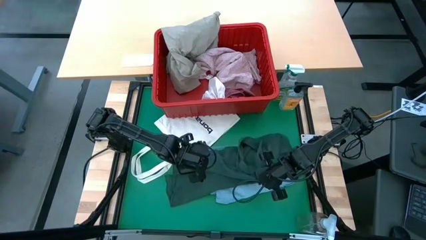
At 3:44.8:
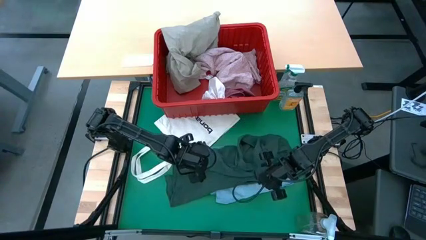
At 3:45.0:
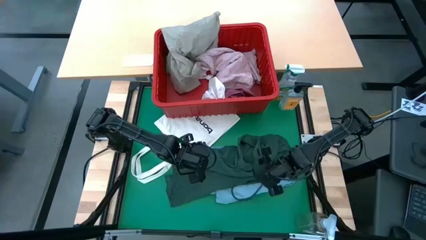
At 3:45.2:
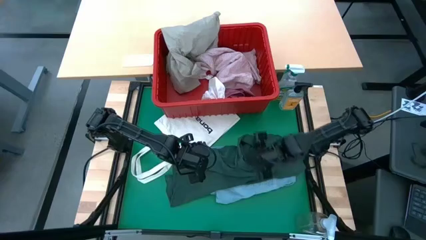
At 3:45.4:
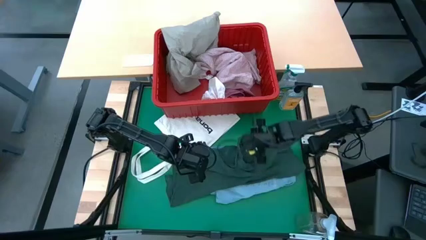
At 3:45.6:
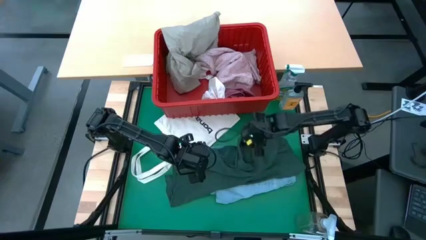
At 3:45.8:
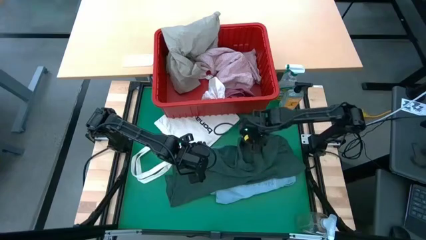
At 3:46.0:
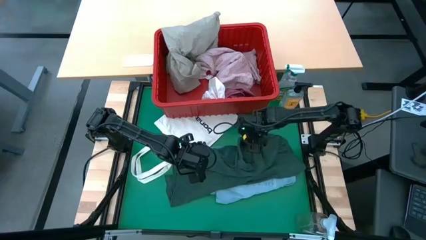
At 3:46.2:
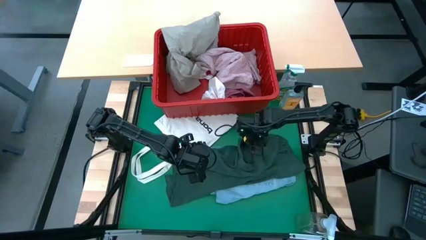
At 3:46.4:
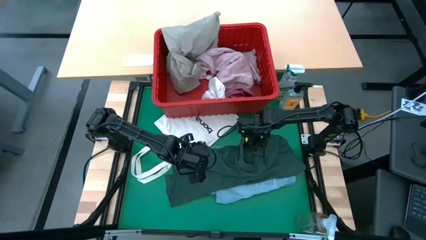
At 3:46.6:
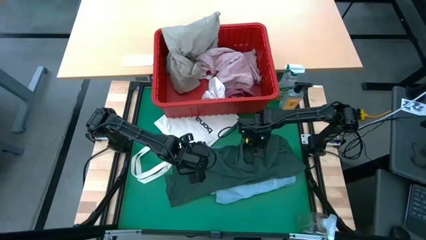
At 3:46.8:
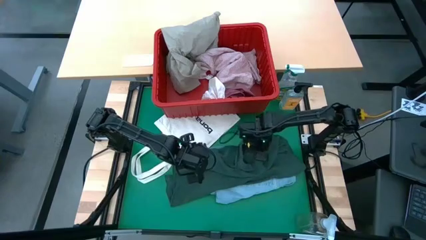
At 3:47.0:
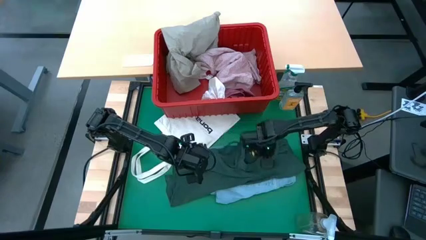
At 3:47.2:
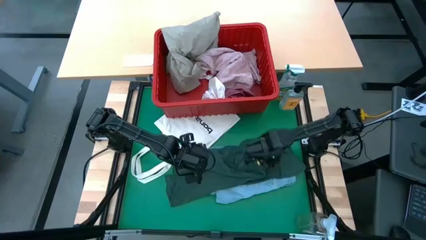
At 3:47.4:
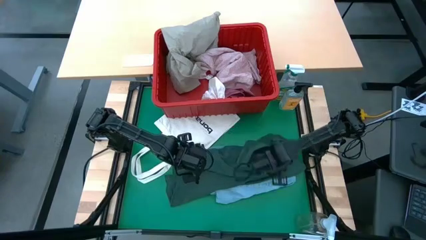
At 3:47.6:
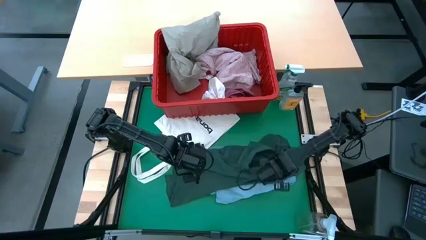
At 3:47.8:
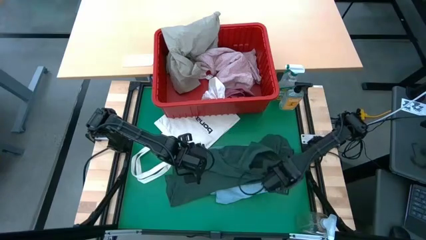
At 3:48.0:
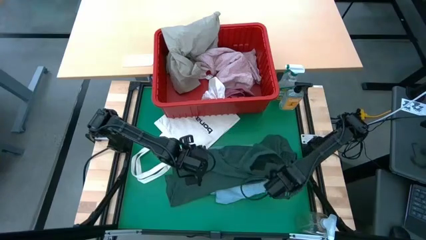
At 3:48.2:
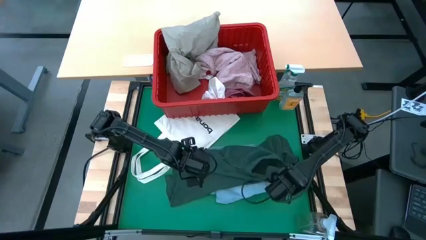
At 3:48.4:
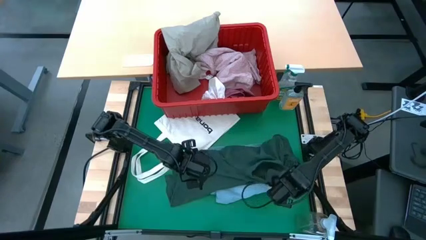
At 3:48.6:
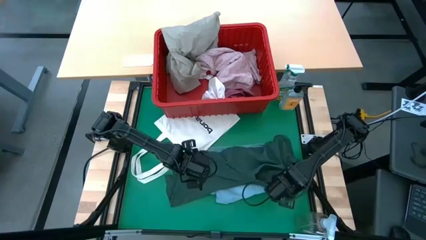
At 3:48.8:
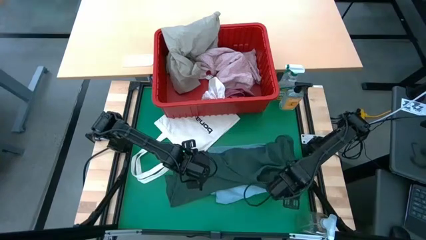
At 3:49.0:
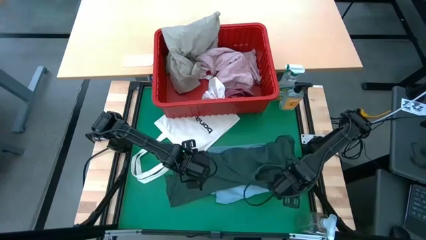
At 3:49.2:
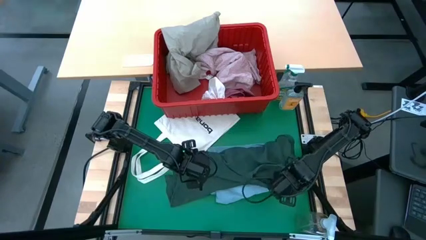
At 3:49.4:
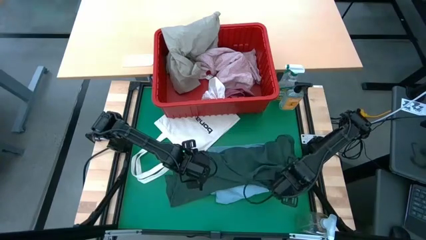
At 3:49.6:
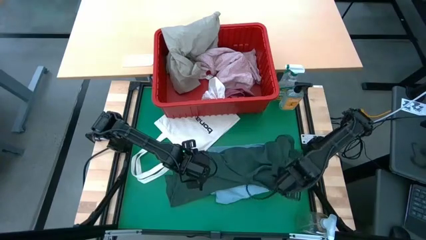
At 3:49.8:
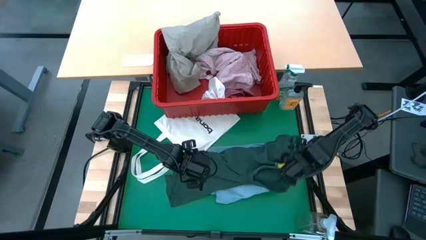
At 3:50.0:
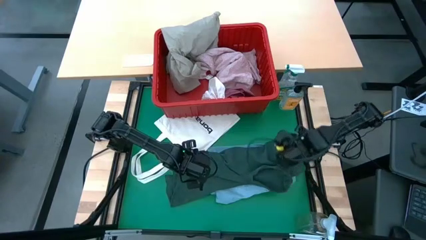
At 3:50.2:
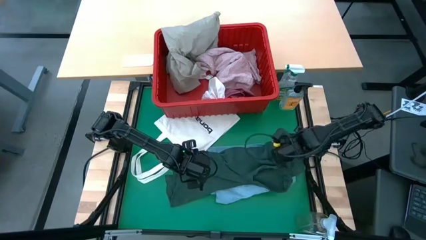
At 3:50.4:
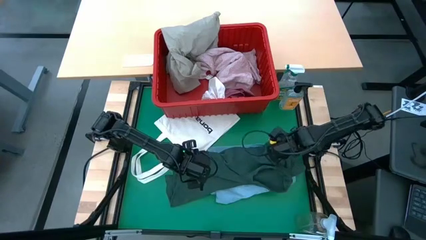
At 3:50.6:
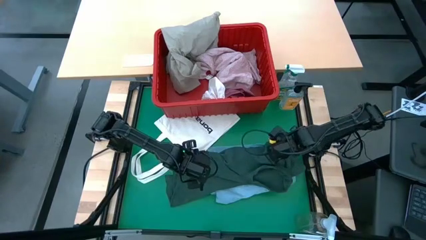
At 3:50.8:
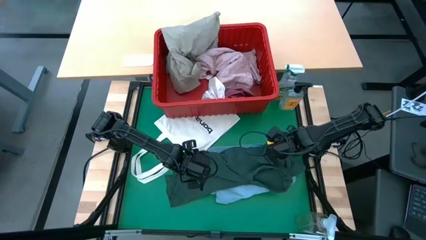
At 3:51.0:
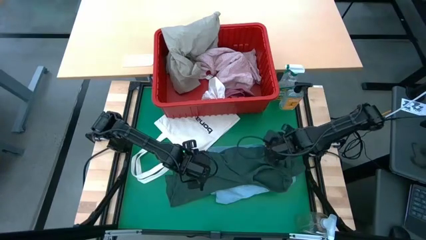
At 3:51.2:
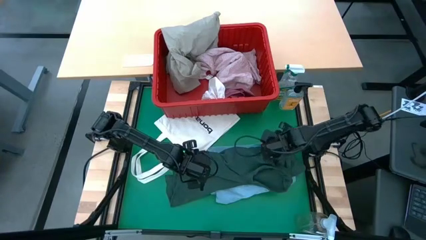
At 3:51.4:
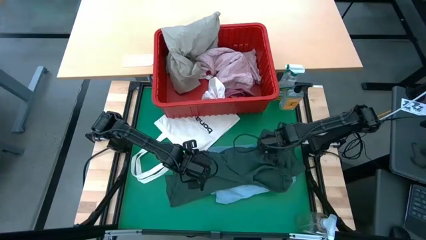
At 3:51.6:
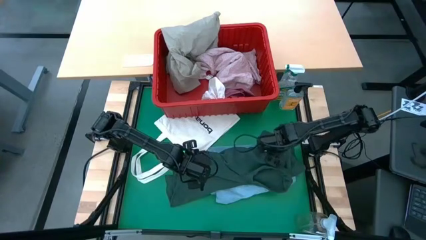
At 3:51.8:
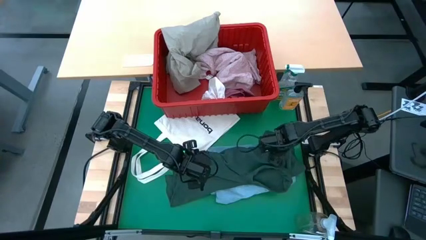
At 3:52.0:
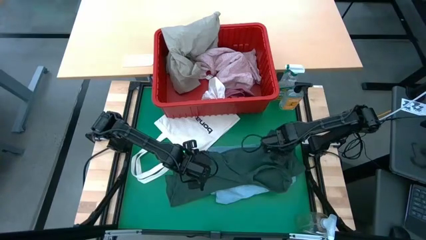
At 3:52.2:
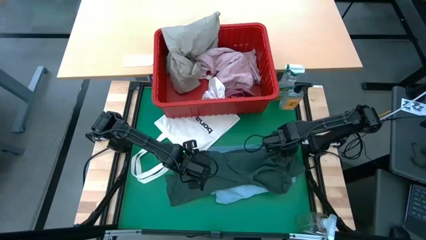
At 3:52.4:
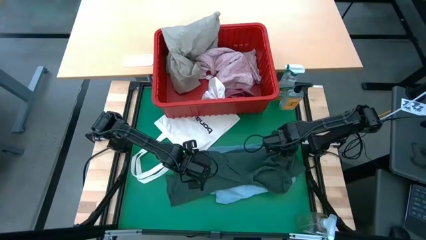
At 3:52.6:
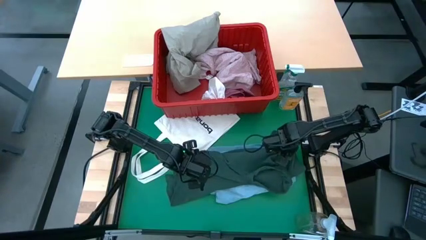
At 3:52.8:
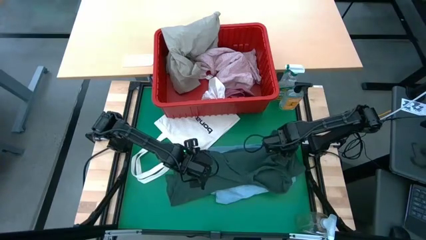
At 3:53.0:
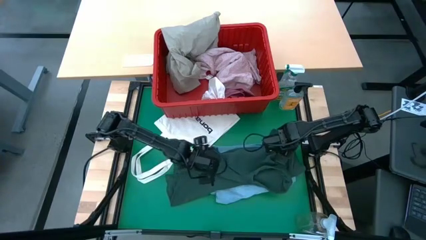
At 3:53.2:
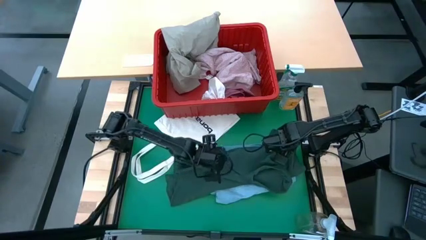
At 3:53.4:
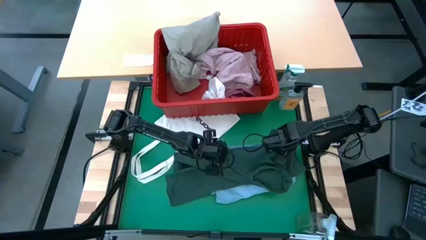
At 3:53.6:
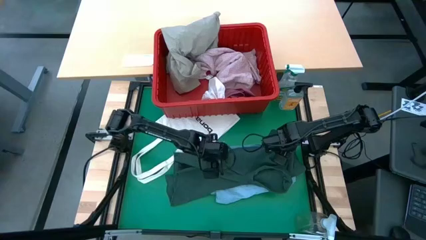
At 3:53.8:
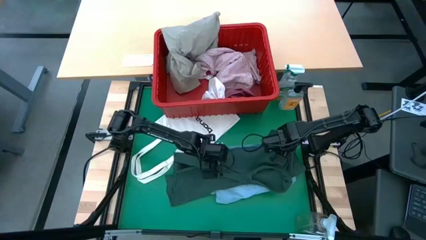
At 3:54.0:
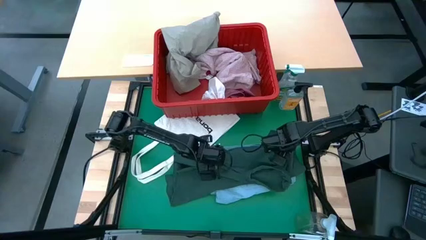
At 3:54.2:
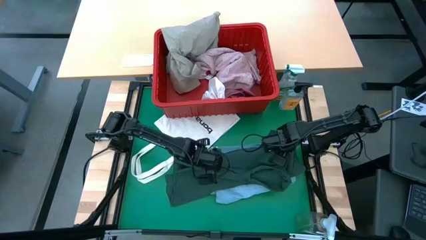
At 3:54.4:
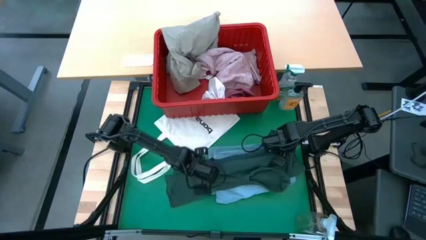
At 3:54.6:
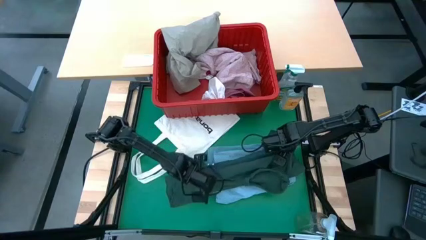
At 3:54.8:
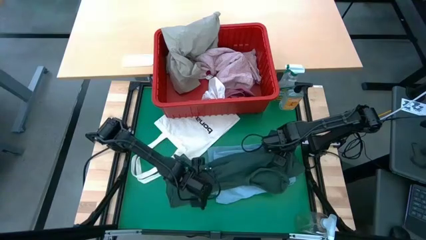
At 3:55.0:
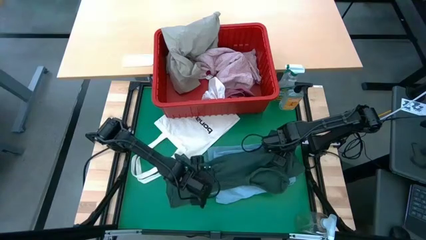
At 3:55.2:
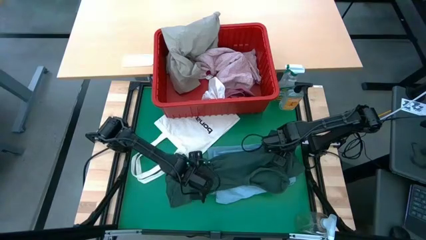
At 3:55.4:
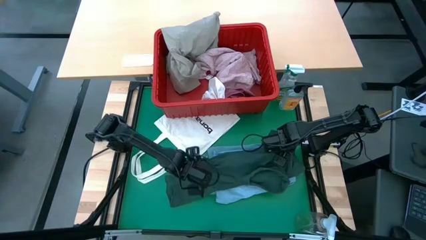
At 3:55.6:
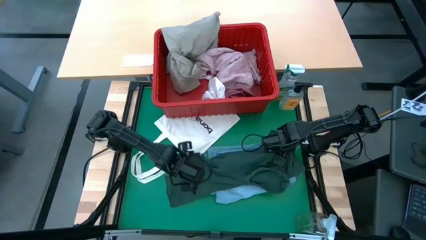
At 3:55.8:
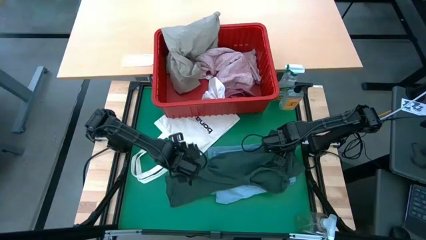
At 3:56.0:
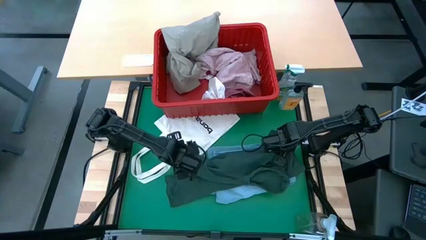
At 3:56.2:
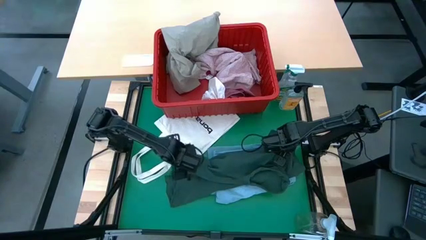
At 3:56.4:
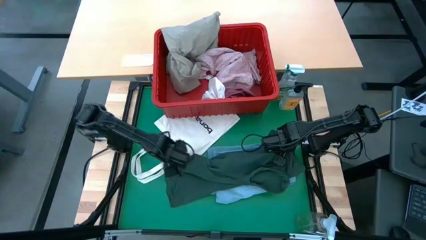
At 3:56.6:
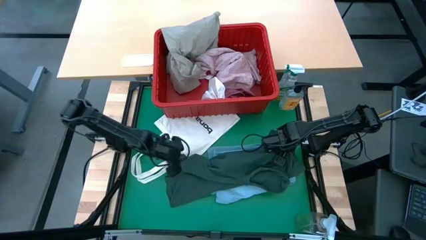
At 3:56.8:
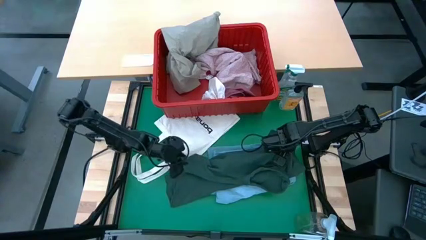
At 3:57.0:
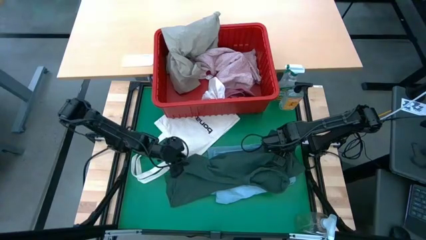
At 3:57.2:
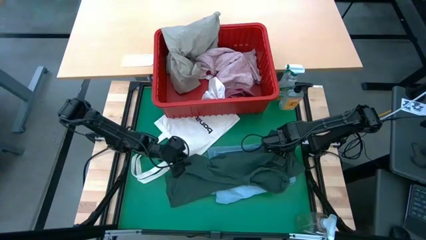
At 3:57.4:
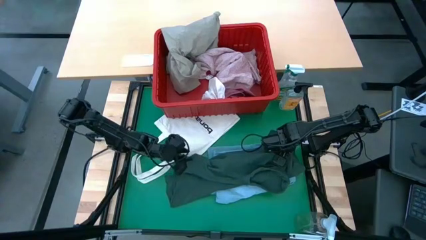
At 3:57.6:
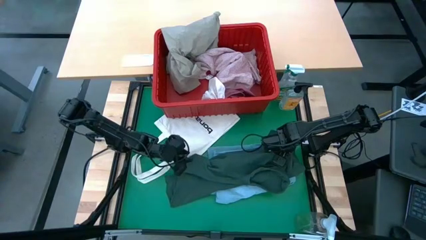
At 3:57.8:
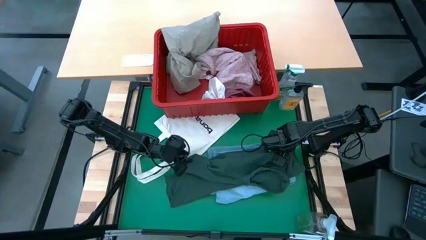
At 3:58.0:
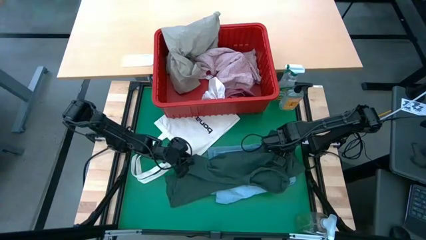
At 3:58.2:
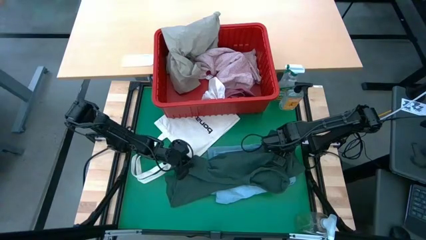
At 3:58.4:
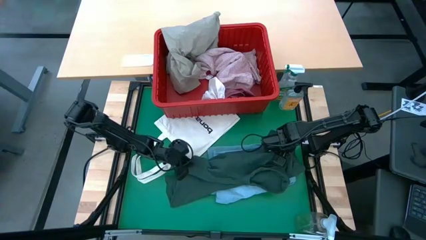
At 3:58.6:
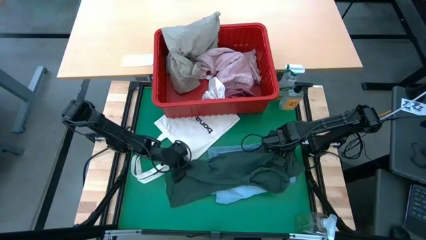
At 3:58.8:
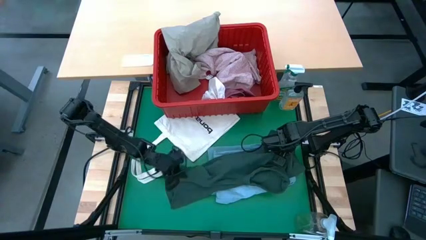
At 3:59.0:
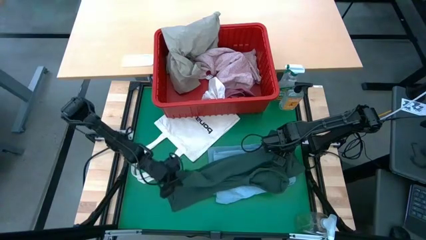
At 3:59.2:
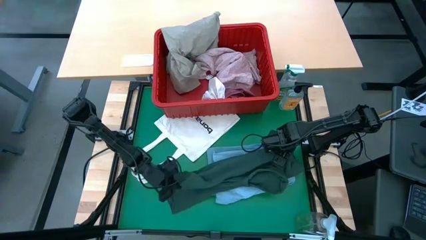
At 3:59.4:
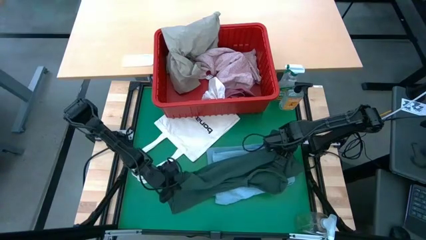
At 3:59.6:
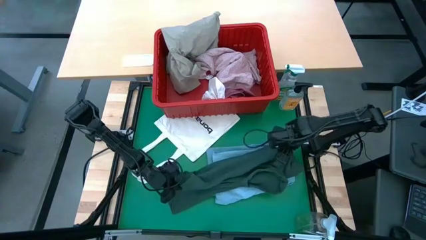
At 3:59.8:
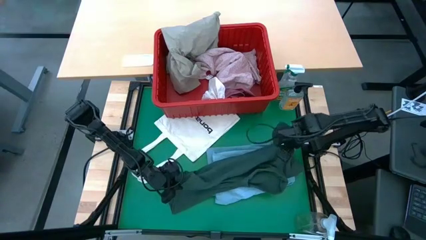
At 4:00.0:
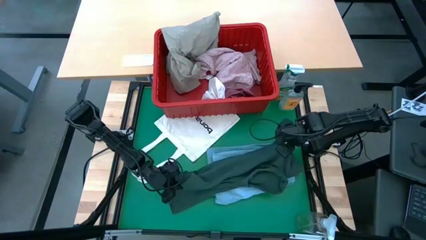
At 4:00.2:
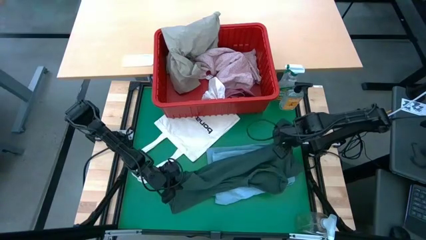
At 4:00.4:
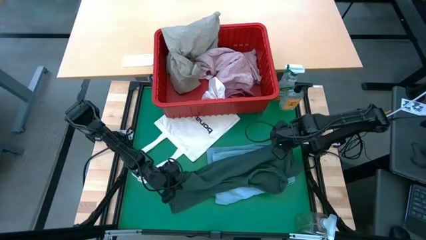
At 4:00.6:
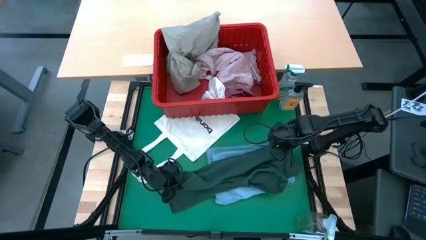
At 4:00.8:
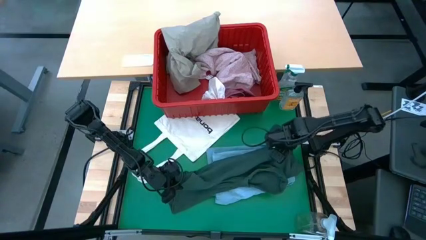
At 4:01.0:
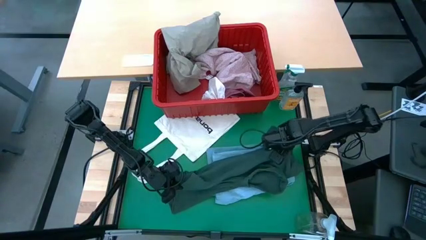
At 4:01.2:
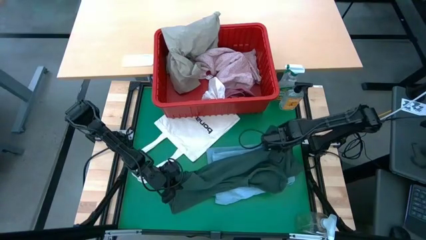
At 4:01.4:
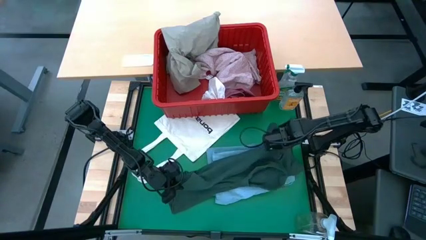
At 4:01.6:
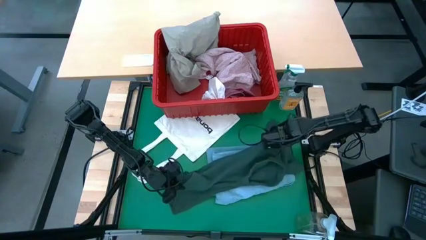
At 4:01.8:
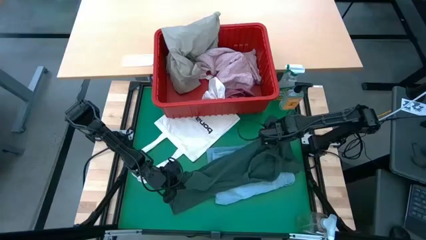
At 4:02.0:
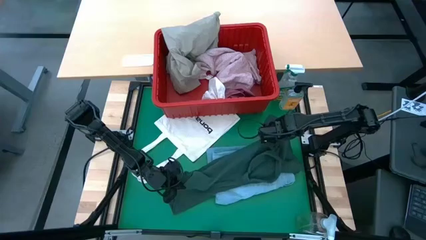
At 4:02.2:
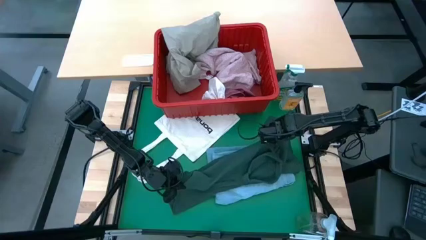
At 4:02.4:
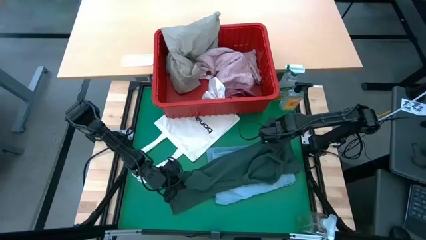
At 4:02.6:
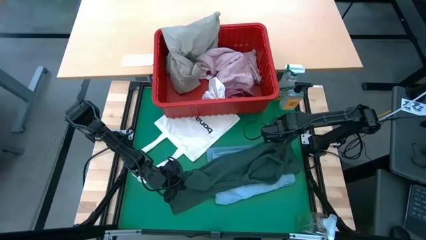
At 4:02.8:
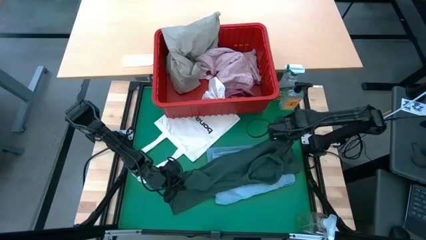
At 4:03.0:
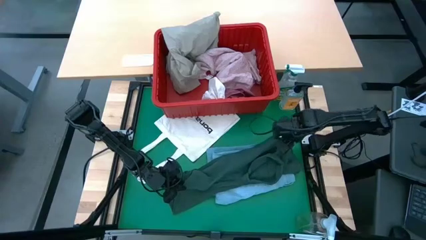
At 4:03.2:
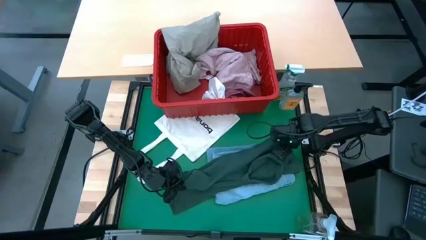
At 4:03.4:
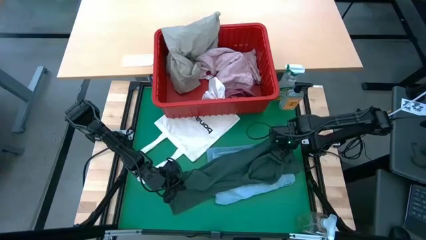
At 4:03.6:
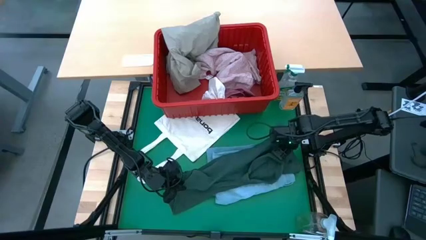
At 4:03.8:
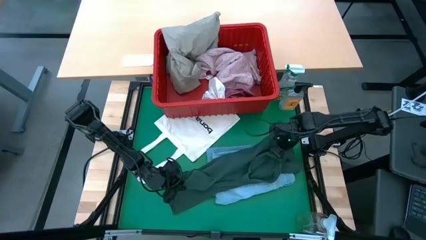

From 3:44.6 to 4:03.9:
Task: Fold laundry
Fold the green shirt
